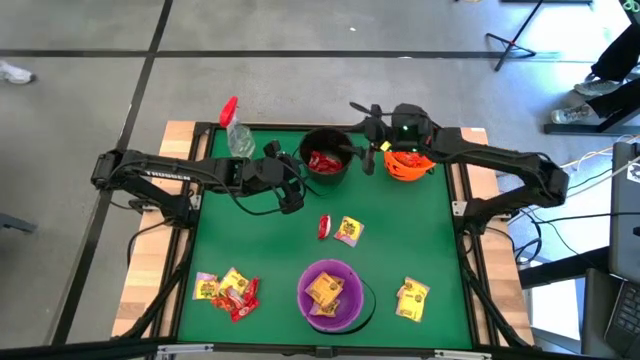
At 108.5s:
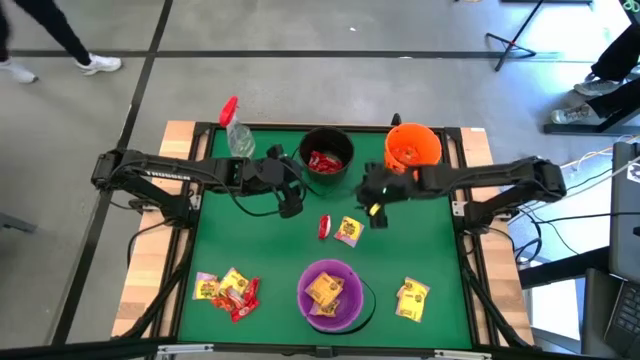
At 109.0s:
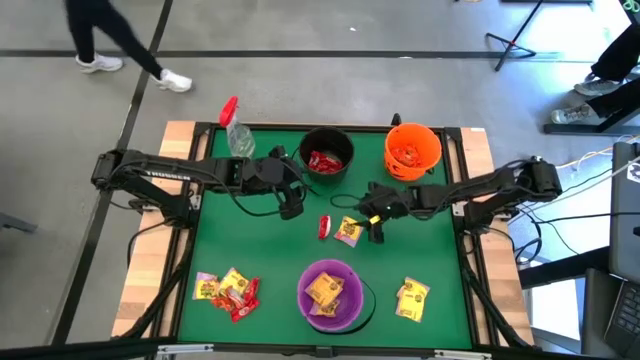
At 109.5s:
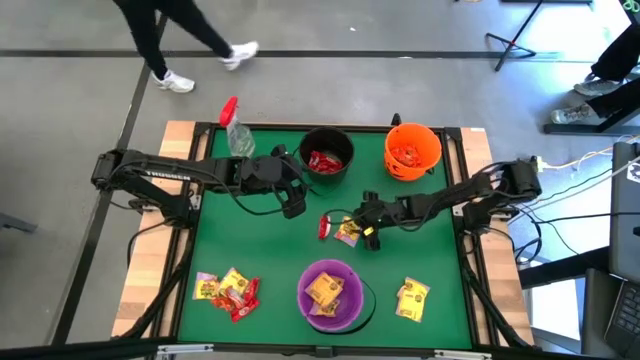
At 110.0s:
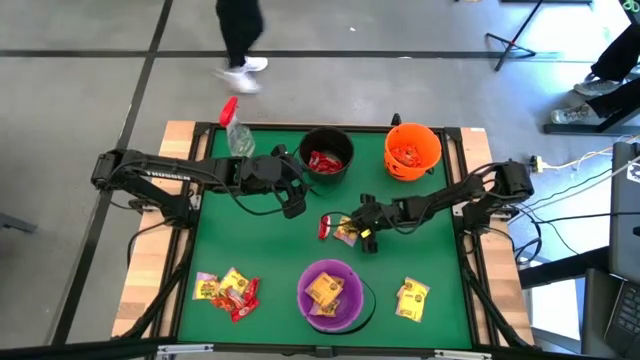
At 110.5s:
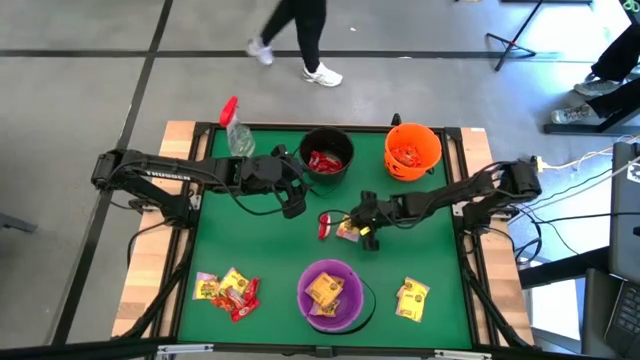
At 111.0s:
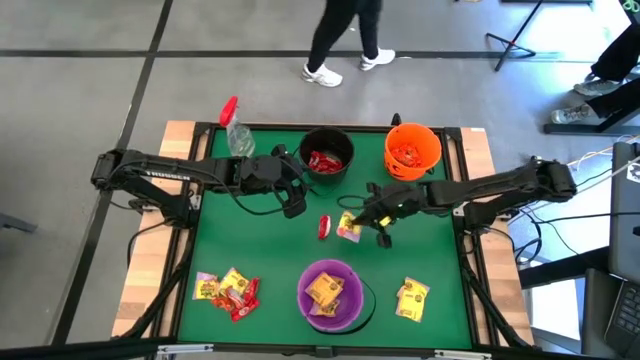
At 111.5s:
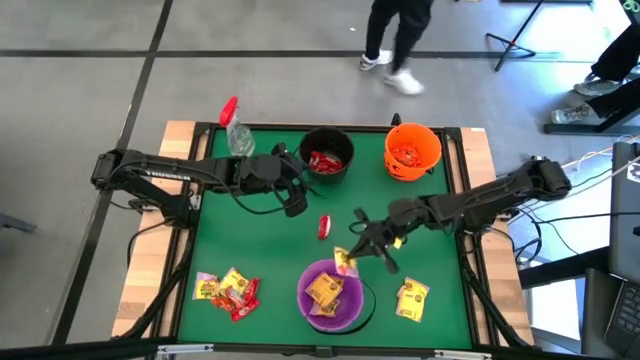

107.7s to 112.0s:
Task: Organize candy in baskets
Put the yellow candy pack into the purple bucket

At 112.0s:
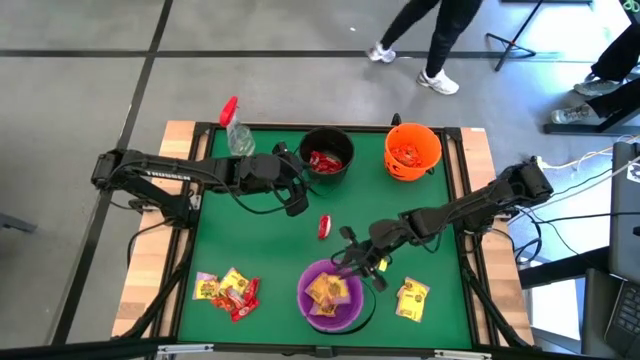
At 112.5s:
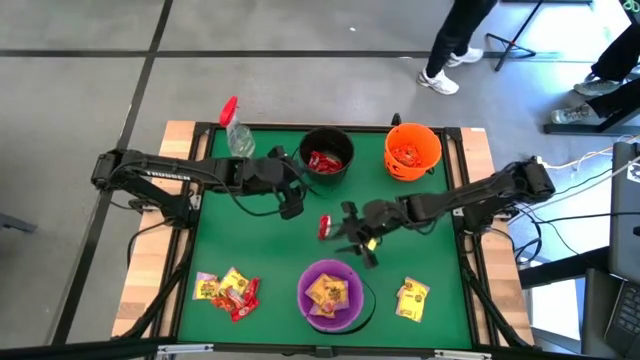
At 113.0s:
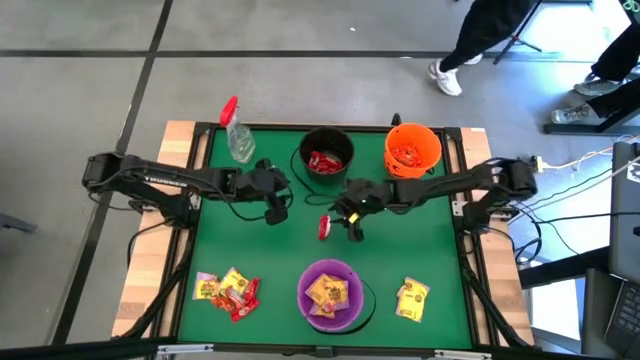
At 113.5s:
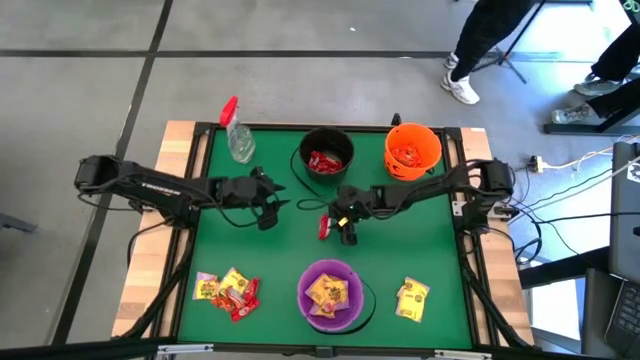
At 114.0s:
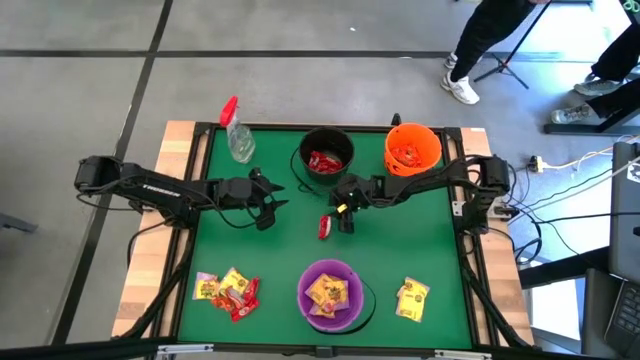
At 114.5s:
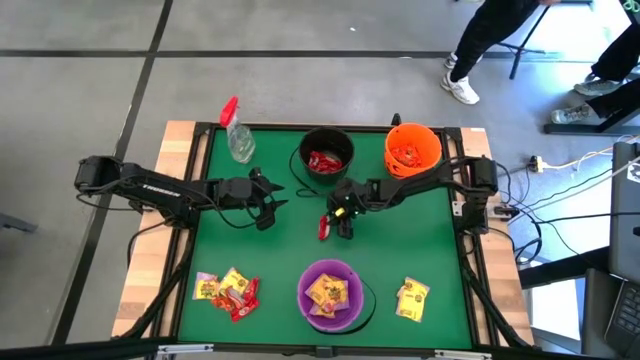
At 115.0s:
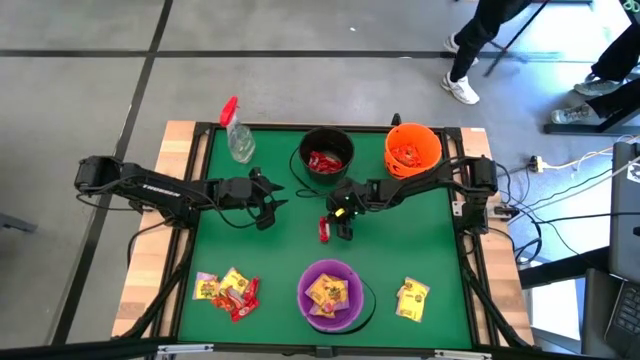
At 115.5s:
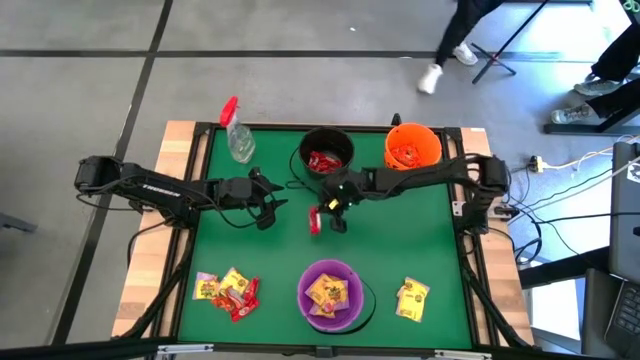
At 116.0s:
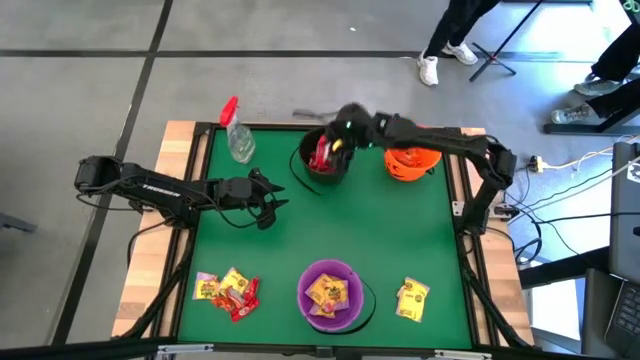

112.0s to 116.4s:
Put the top red candy pack into the black bucket

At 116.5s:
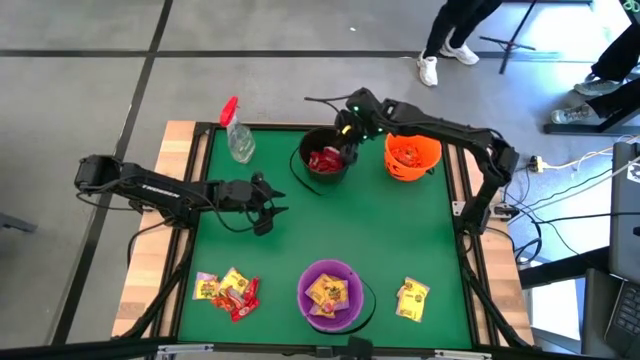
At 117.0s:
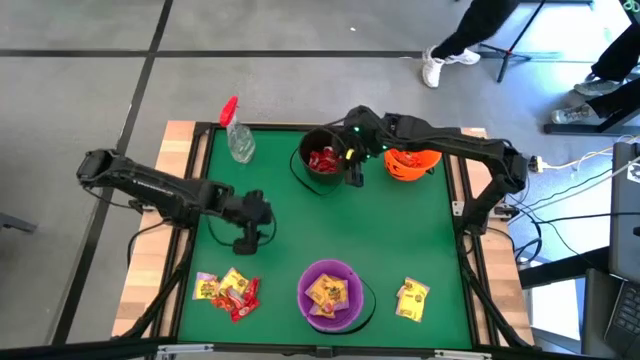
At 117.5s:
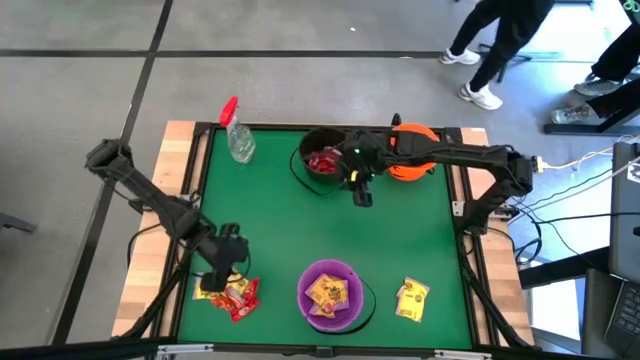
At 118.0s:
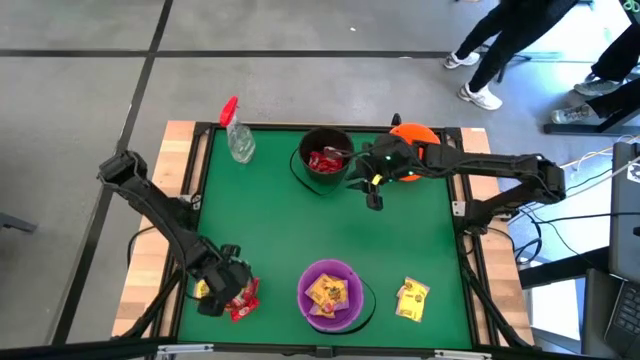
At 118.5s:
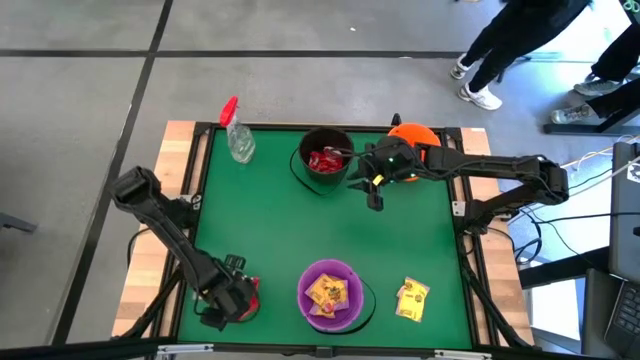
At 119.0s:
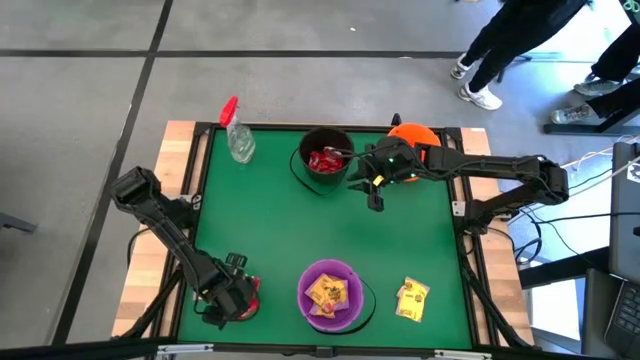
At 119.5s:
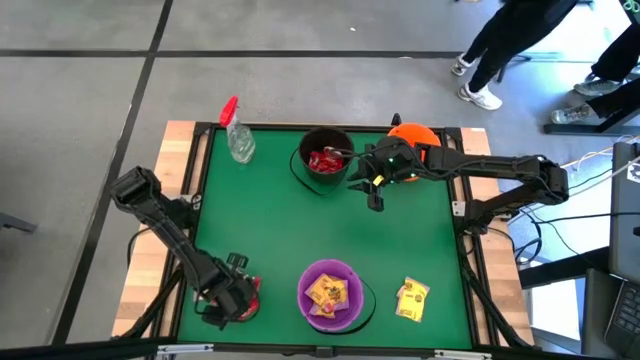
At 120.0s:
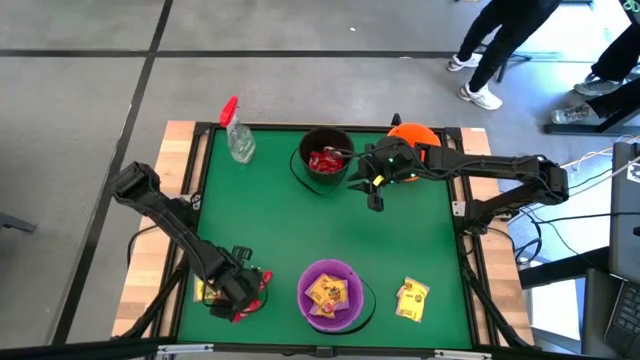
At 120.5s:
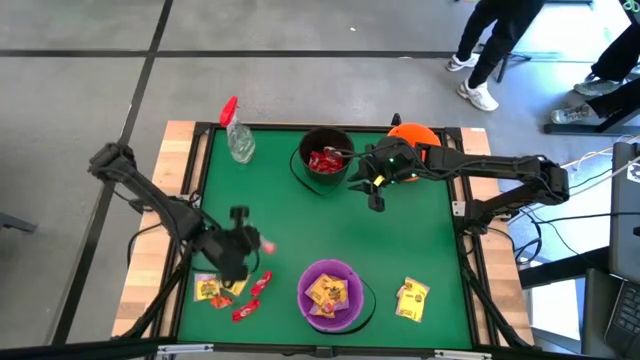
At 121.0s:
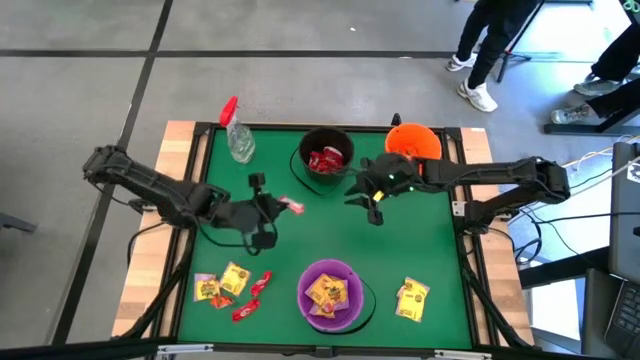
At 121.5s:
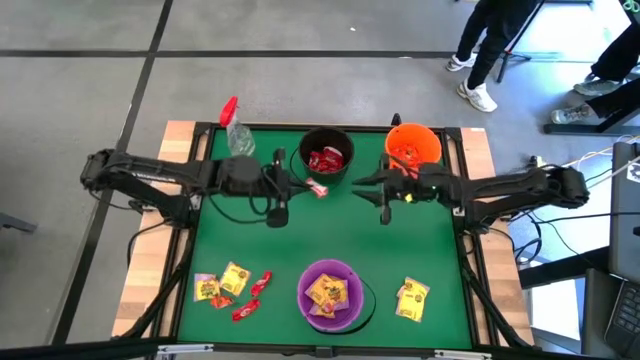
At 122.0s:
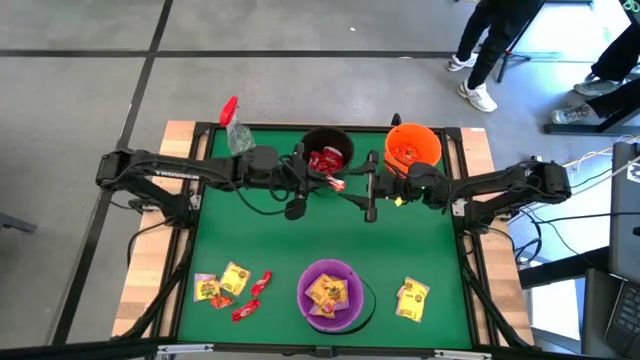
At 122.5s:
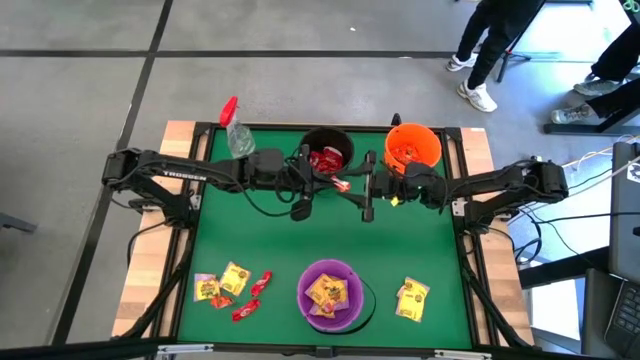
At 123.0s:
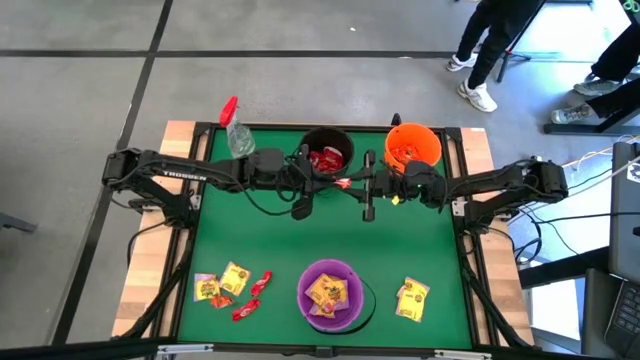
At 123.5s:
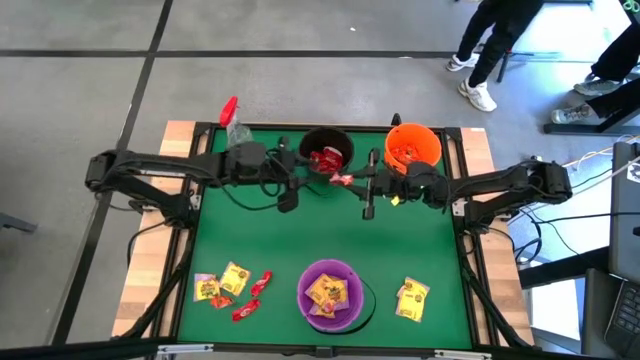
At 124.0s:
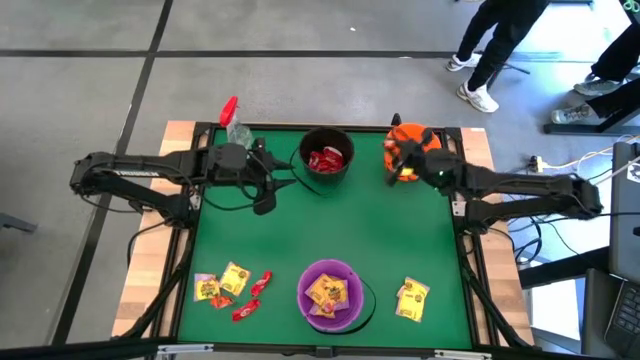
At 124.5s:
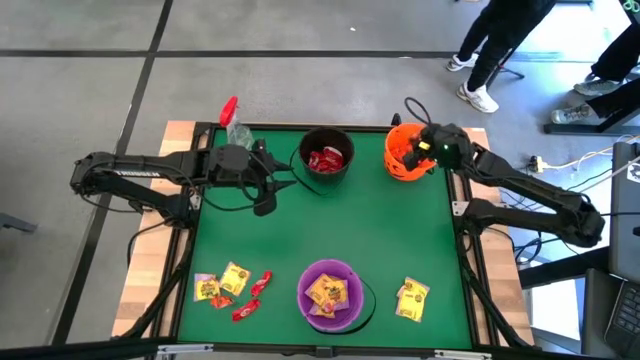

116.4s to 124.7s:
Put the top orange candy pack into the orange bucket

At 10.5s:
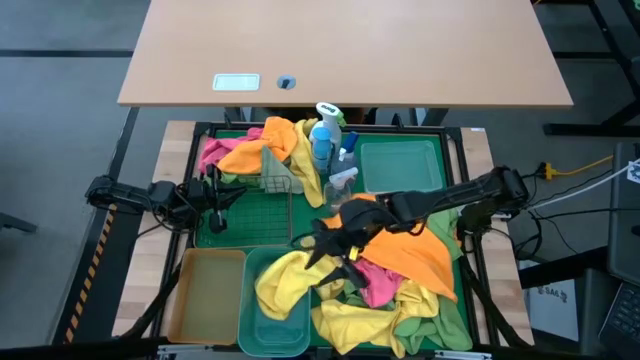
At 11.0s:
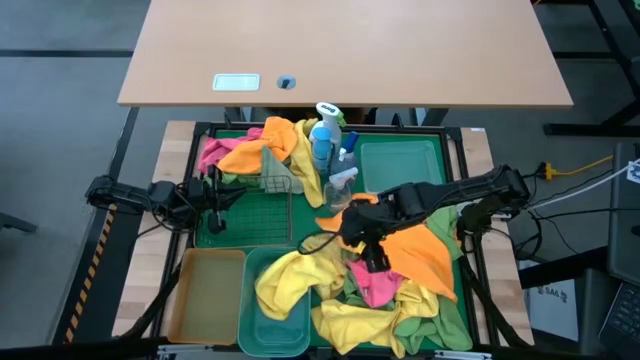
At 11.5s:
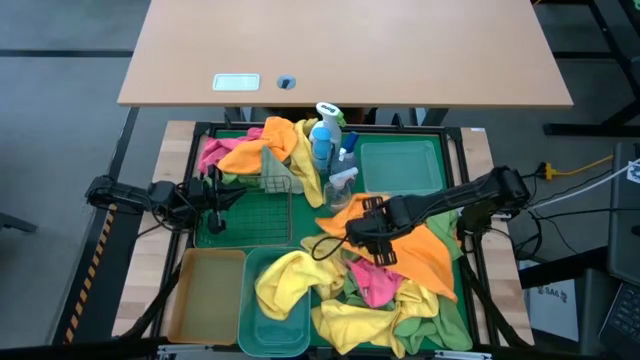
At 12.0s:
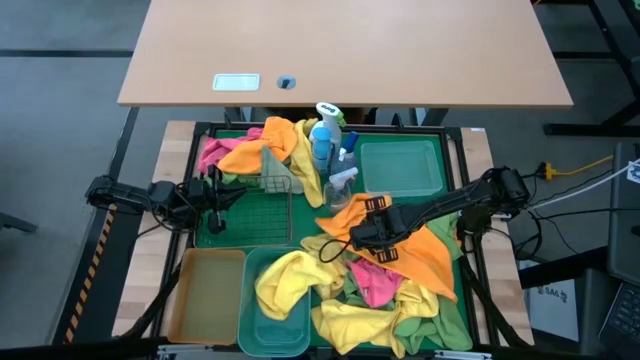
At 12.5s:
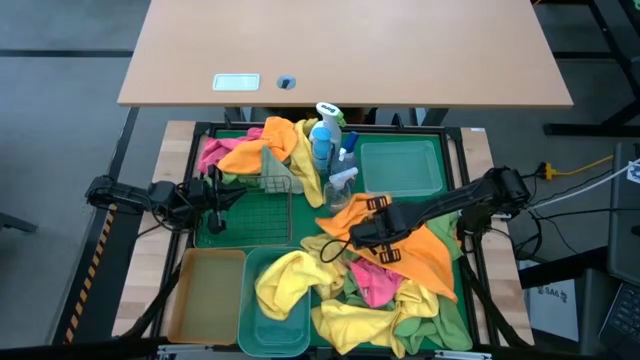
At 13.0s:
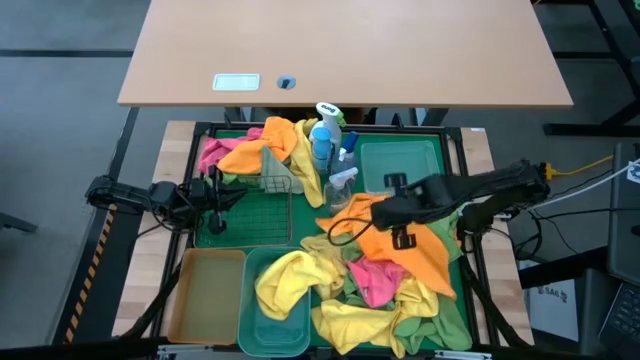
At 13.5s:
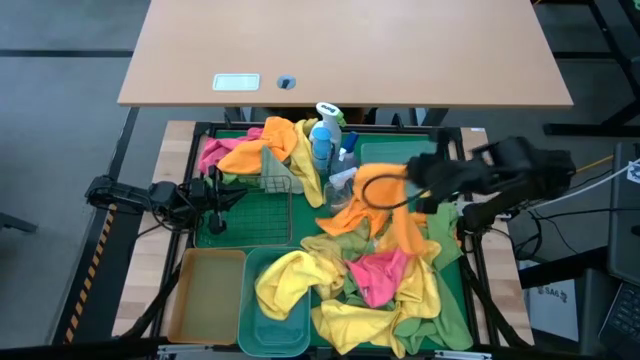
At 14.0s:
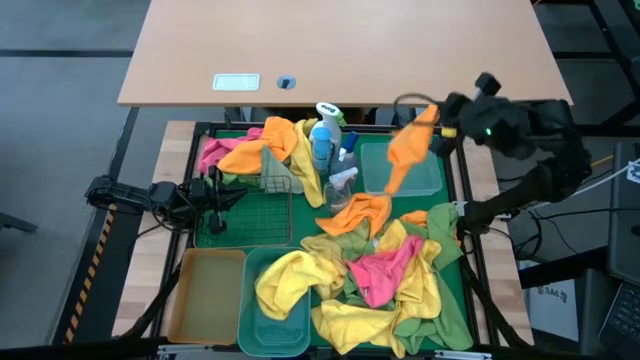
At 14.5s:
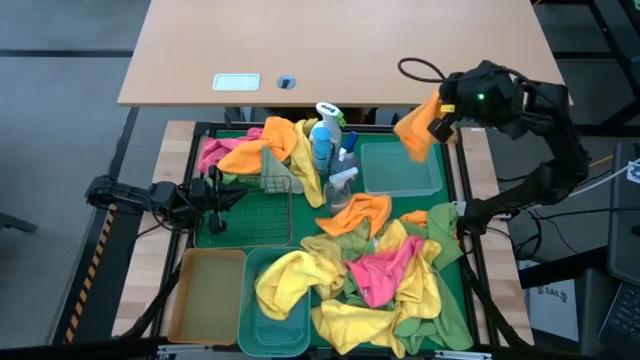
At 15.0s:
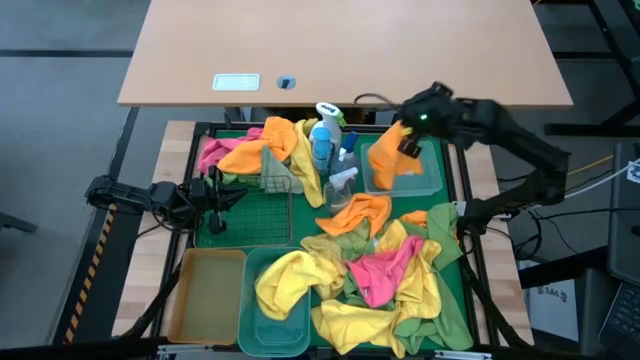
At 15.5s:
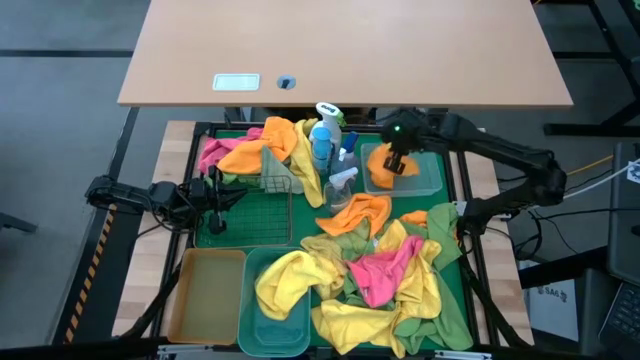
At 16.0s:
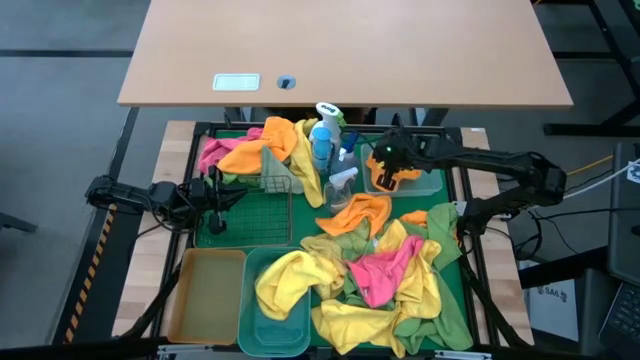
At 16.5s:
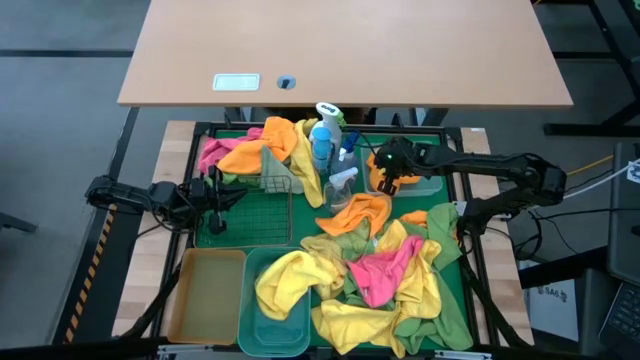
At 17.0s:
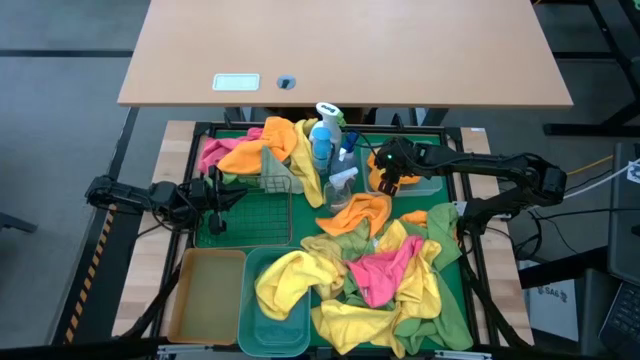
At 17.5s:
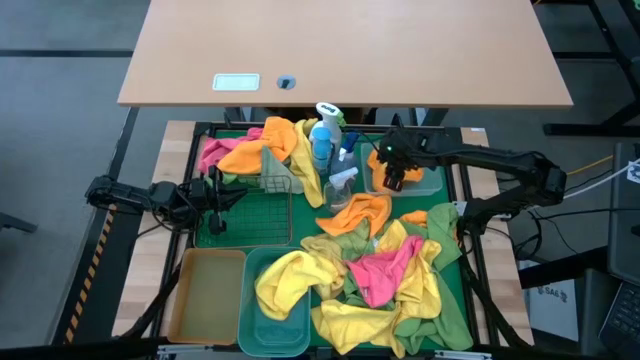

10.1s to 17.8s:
Task: Sort microfiber towel by color & place in baskets
Put the orange towel into the white bin
